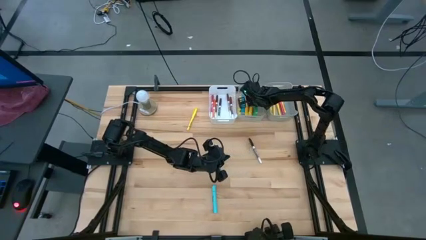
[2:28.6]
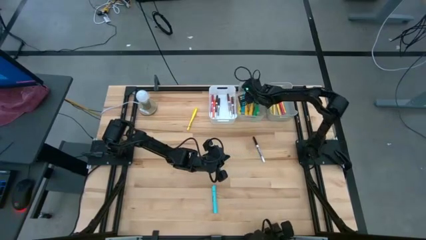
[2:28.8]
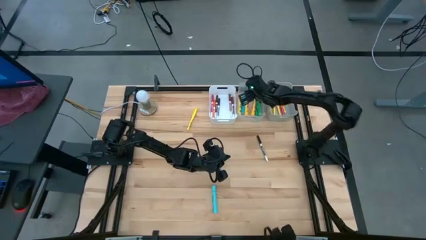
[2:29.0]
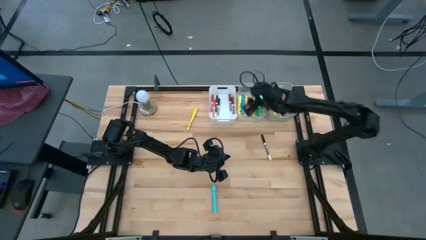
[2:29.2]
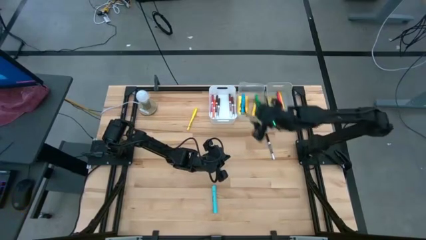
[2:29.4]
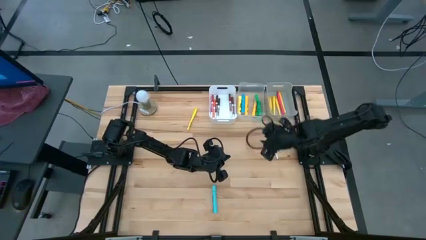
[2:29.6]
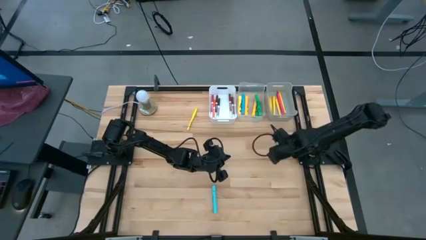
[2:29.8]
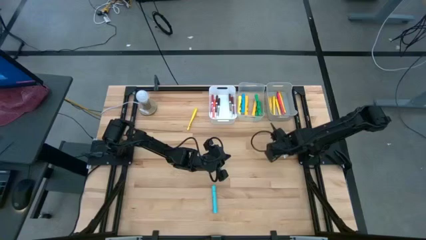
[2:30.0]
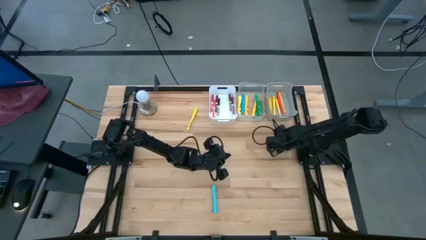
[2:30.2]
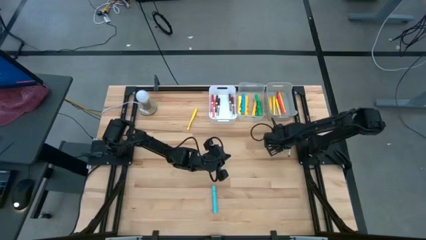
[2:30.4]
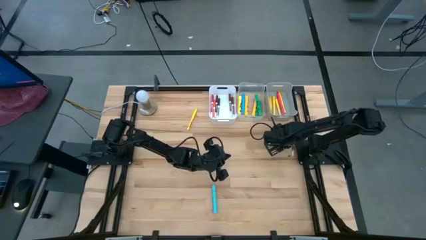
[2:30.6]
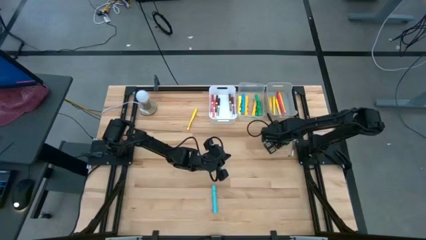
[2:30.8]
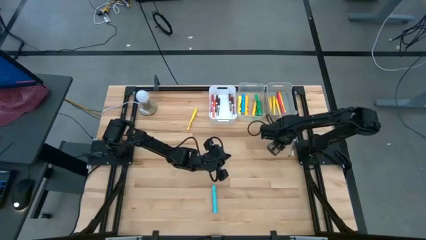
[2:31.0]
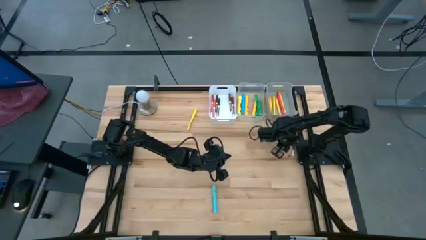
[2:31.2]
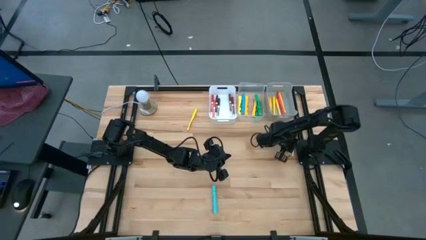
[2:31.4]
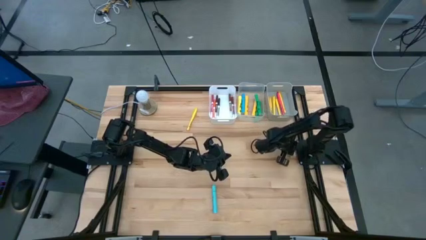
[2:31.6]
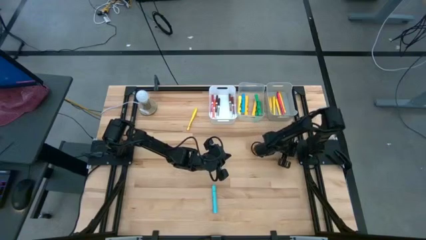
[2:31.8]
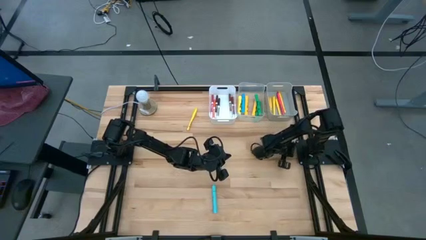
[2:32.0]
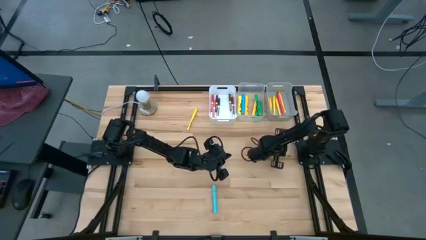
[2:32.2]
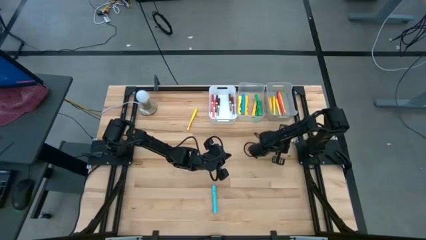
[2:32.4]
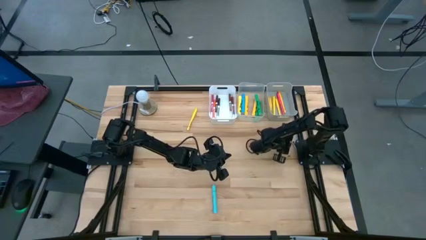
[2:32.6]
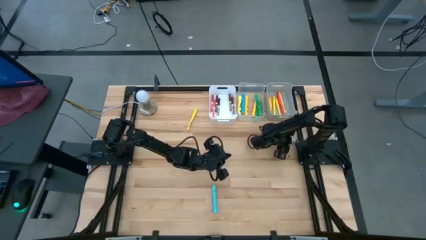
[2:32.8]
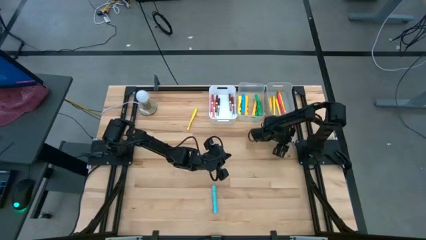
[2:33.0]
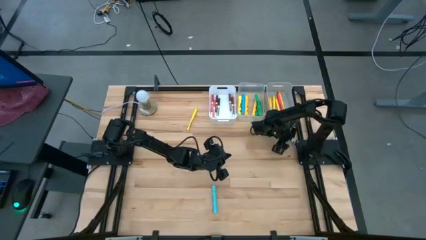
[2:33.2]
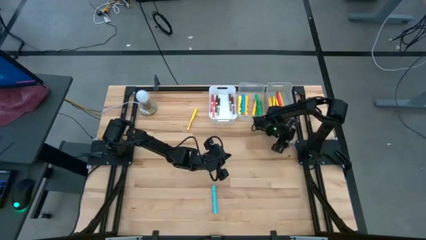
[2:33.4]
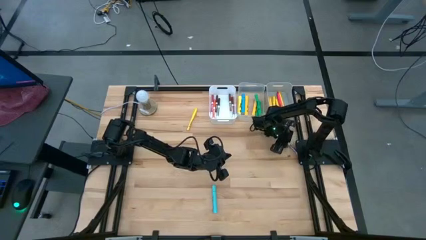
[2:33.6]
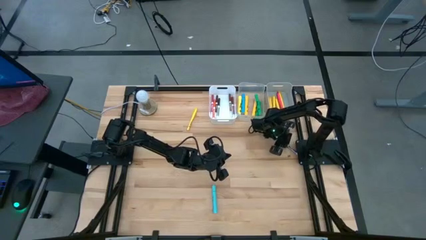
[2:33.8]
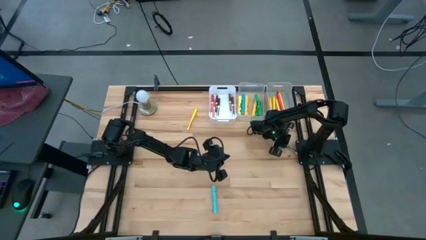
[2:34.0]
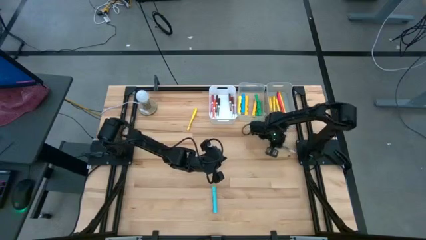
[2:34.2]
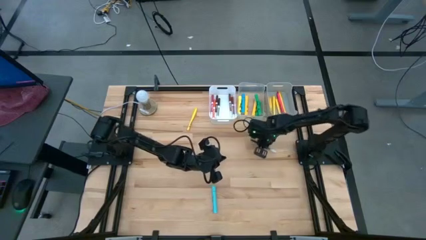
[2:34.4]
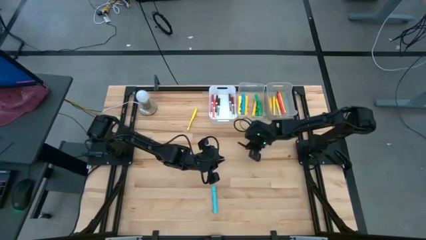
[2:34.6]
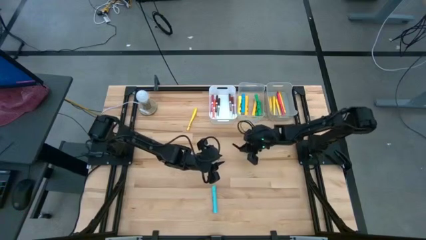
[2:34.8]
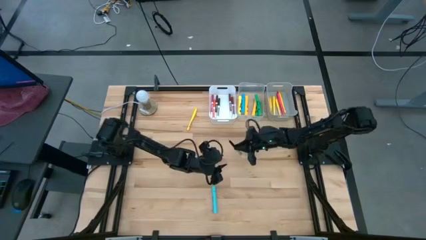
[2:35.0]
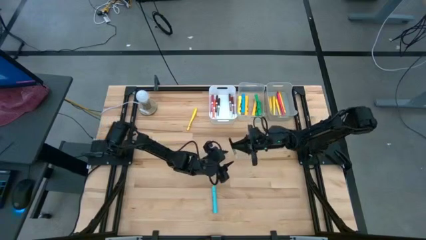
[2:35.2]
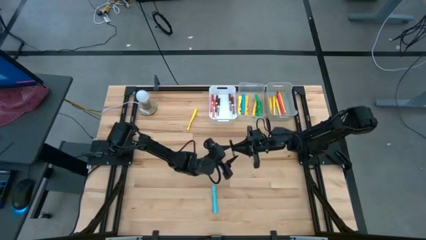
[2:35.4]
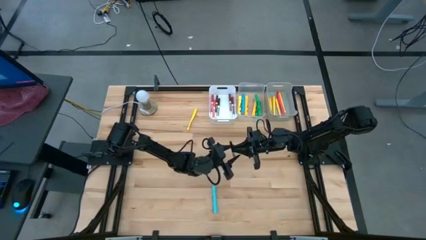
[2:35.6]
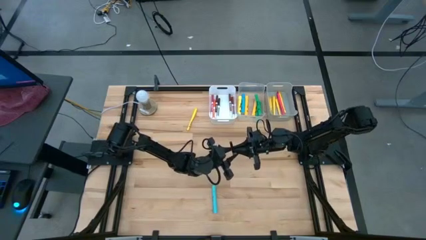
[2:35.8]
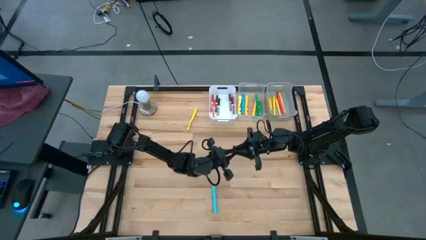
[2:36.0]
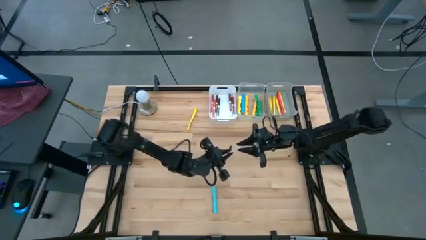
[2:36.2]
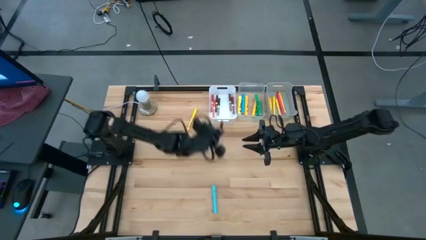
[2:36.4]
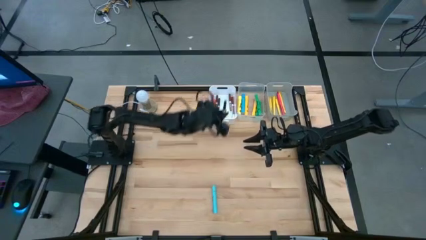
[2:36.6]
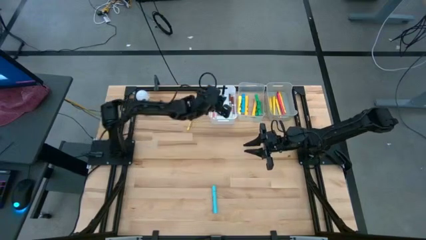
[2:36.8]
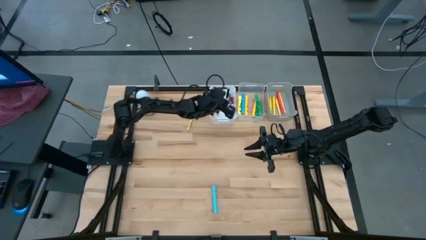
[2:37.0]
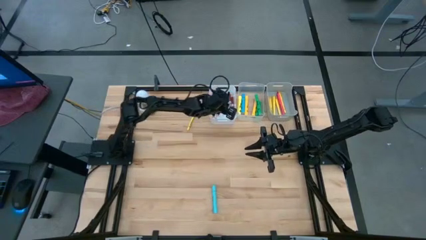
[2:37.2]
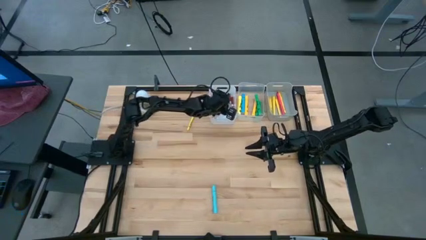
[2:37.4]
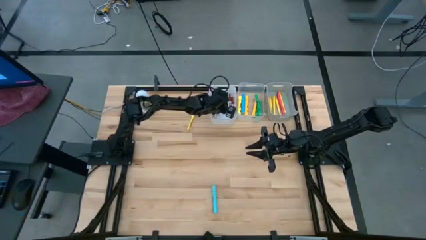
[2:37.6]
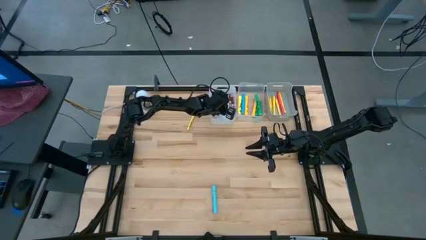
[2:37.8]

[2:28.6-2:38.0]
Task: Pick & Place Markers
Put the black marker pen into the white bin

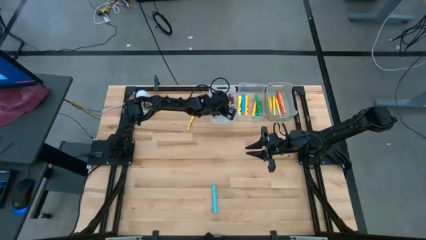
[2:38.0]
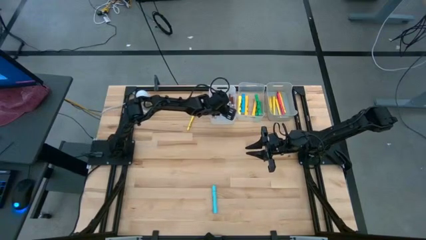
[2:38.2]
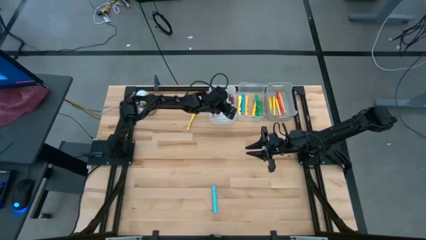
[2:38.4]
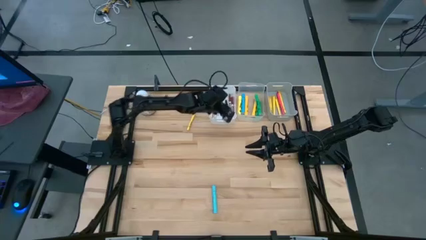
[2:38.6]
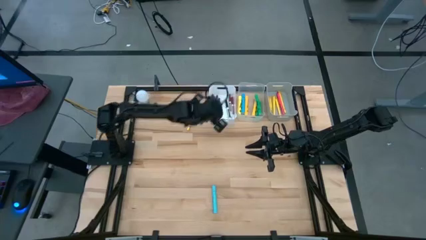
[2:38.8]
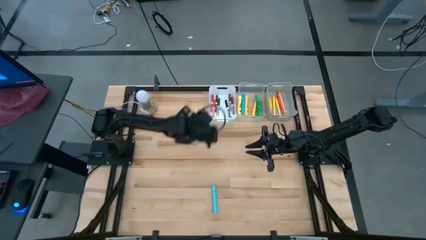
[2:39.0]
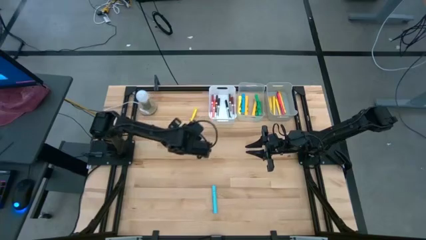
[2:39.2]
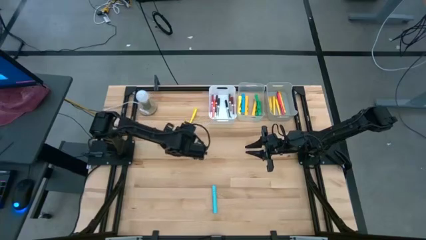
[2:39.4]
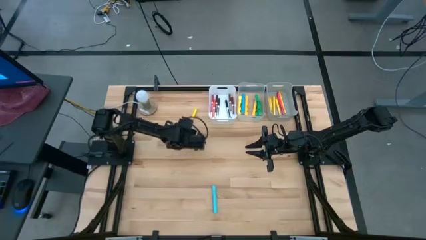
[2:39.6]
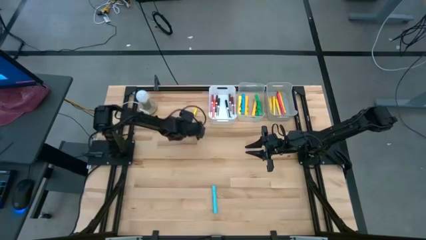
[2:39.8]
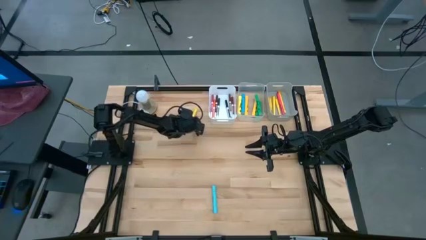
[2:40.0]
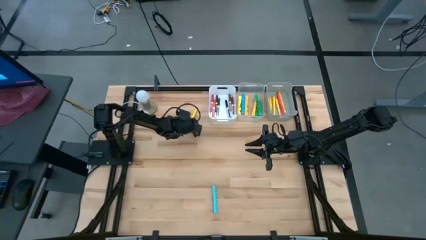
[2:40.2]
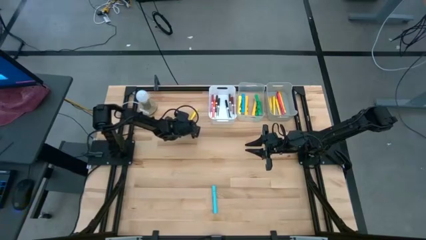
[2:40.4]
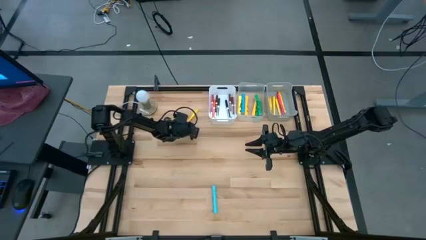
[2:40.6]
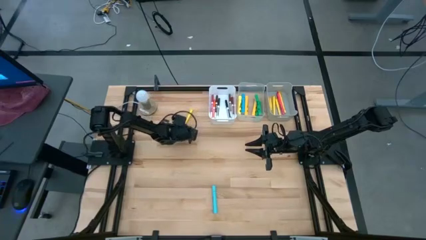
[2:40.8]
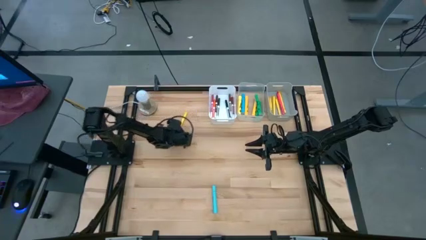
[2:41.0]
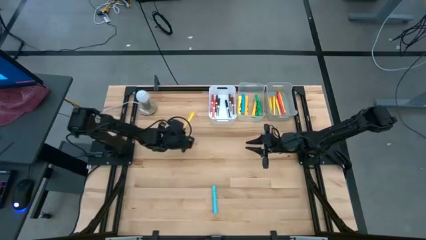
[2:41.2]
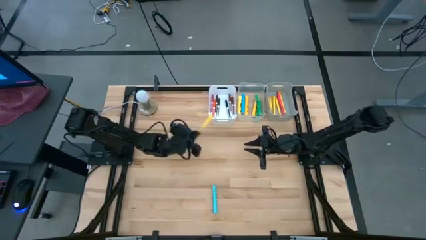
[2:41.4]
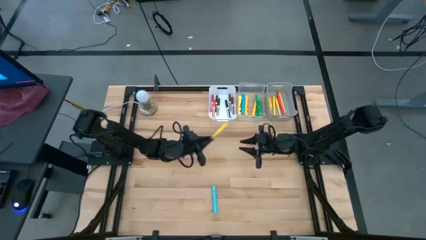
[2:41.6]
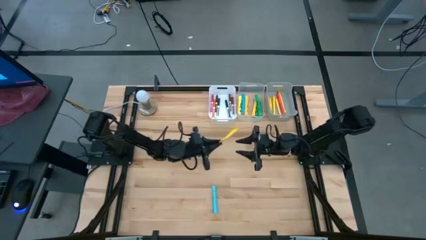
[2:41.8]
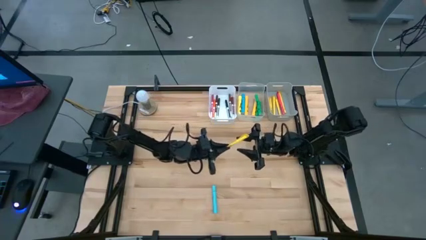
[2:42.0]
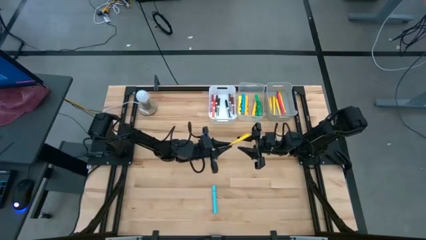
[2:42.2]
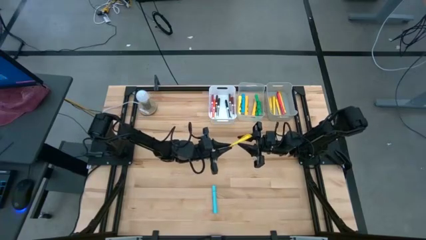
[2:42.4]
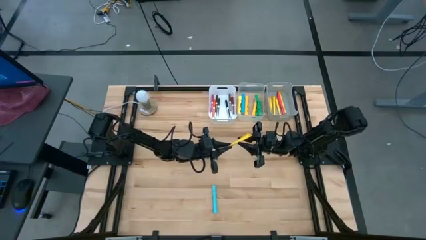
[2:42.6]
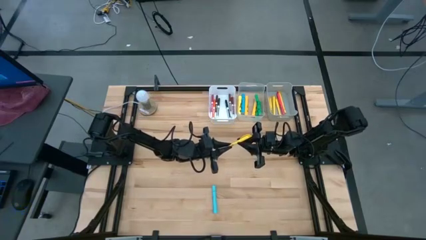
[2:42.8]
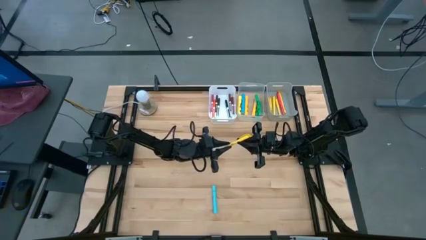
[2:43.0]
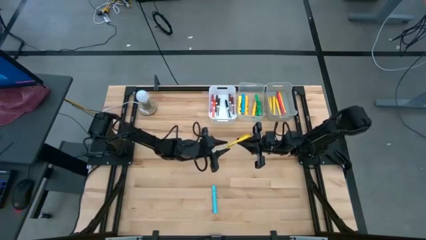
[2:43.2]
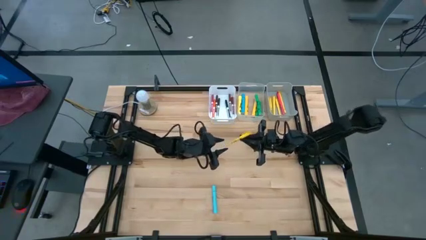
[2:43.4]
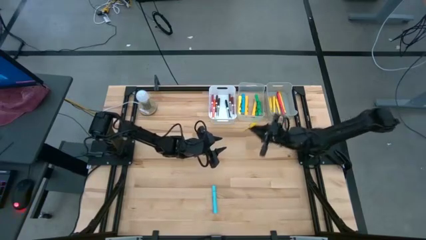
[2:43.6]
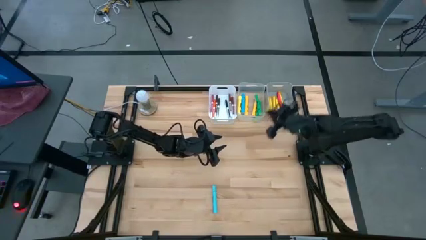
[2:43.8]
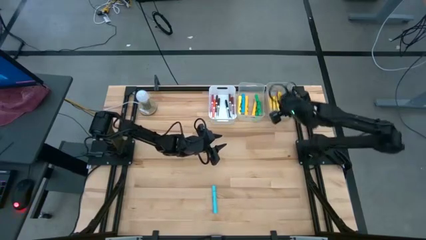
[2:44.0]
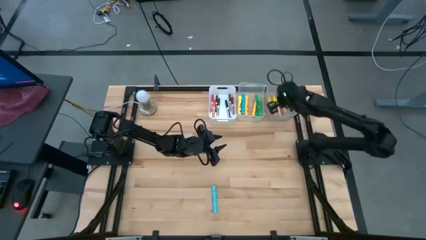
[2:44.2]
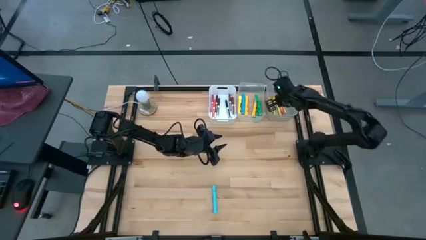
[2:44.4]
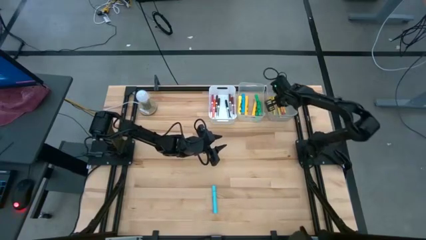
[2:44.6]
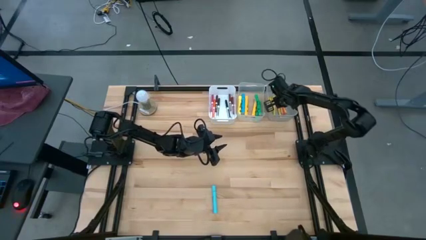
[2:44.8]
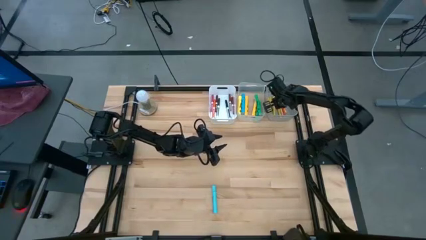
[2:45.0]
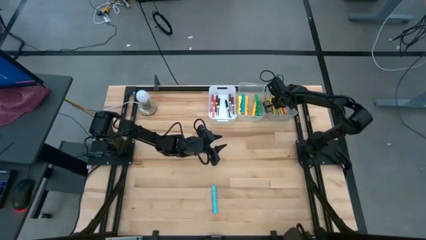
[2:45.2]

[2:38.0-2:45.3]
Put the yellow pen into the gray bin
